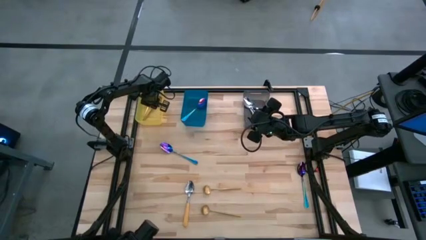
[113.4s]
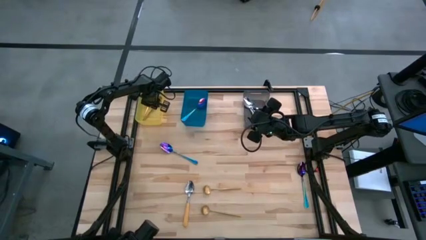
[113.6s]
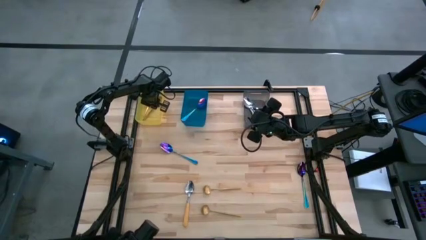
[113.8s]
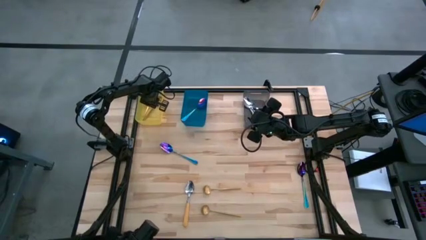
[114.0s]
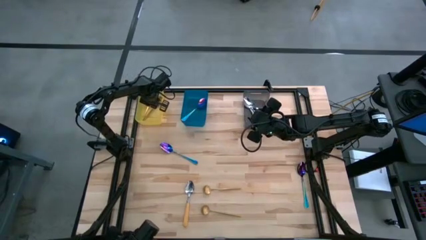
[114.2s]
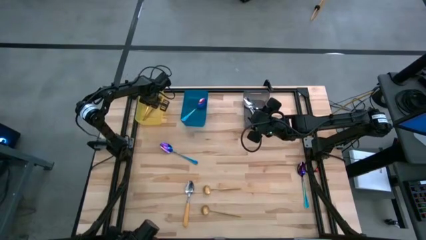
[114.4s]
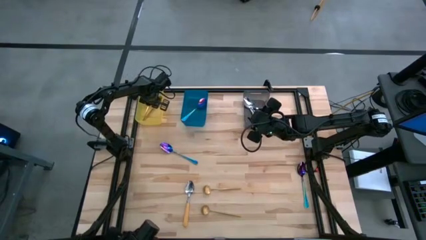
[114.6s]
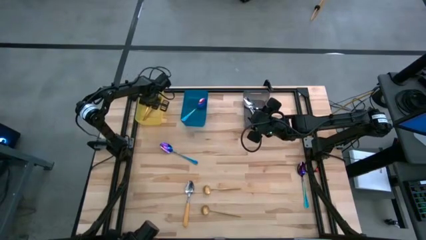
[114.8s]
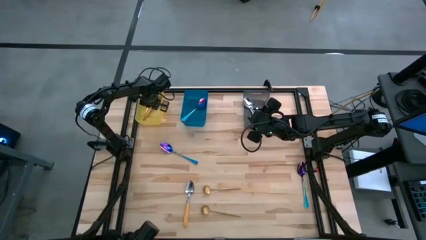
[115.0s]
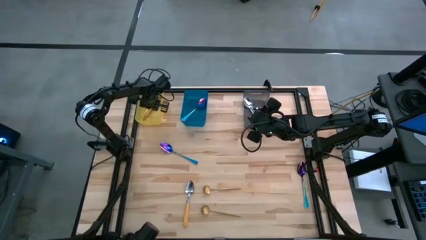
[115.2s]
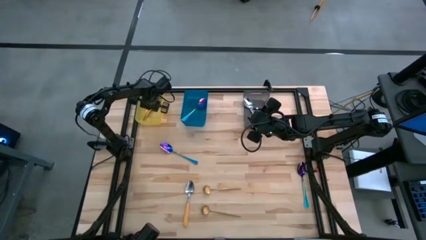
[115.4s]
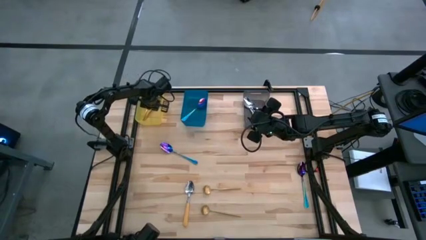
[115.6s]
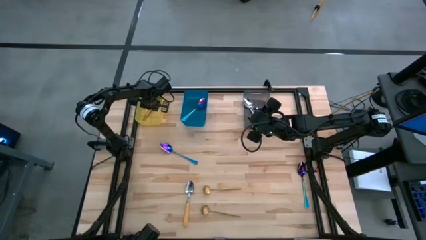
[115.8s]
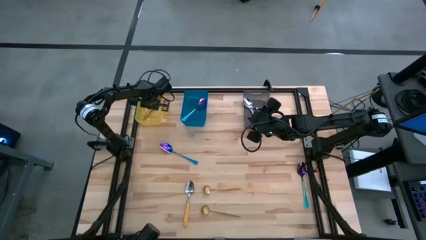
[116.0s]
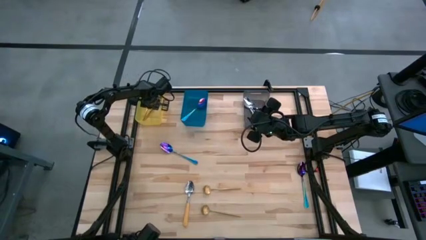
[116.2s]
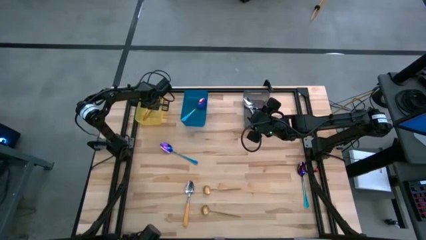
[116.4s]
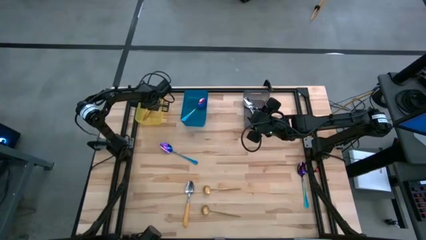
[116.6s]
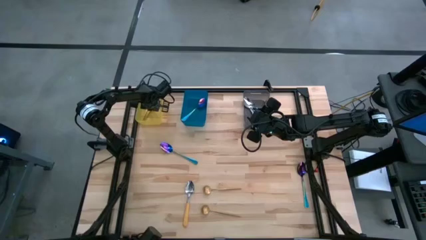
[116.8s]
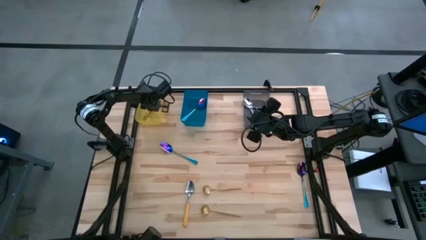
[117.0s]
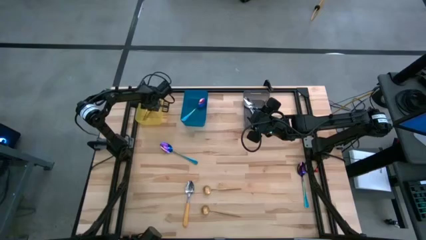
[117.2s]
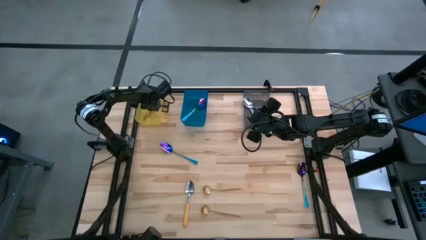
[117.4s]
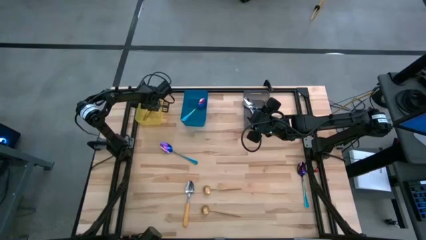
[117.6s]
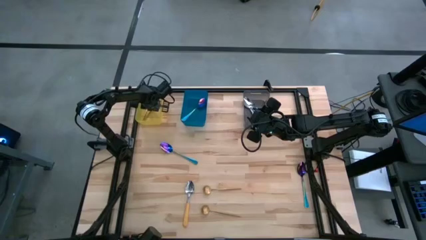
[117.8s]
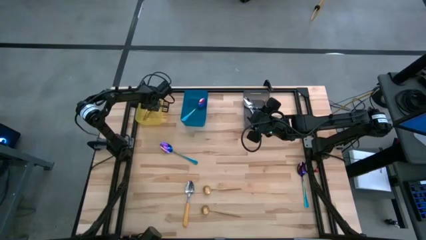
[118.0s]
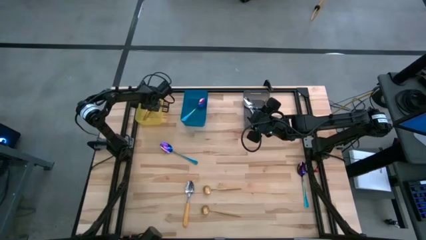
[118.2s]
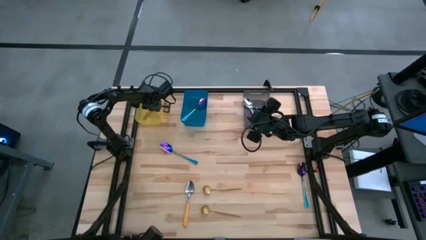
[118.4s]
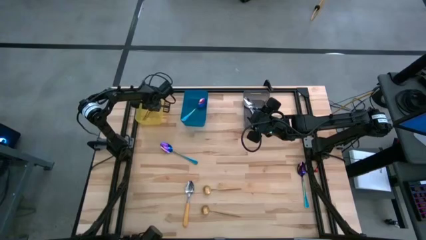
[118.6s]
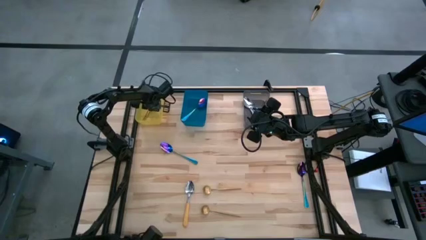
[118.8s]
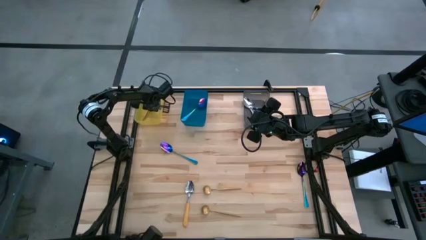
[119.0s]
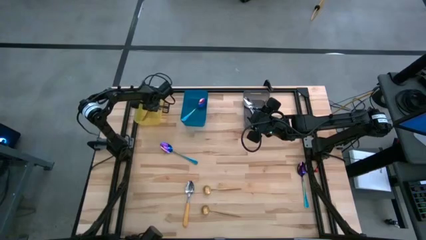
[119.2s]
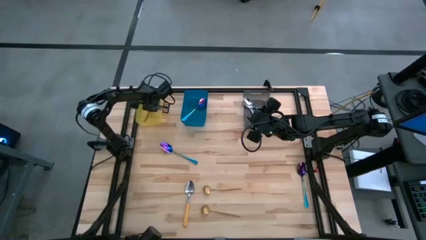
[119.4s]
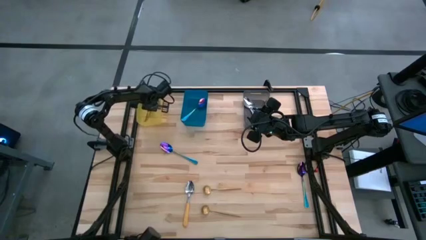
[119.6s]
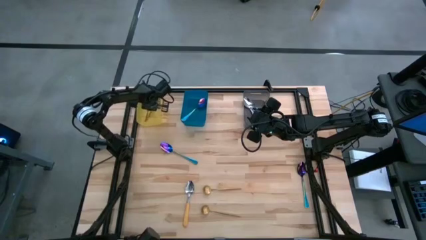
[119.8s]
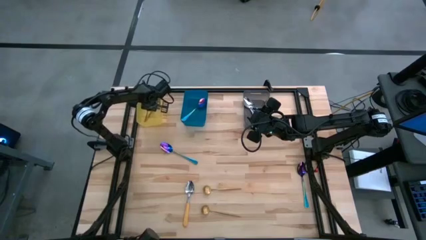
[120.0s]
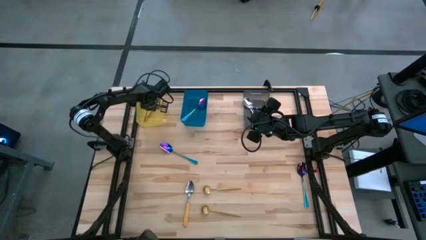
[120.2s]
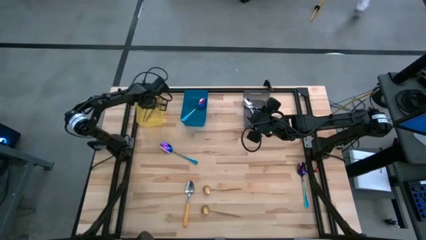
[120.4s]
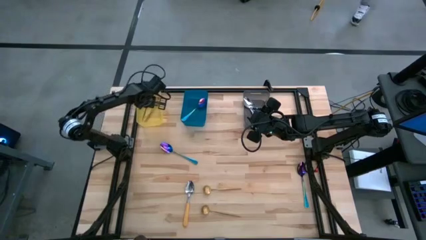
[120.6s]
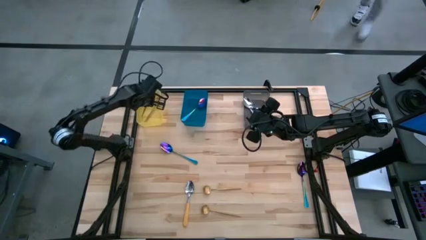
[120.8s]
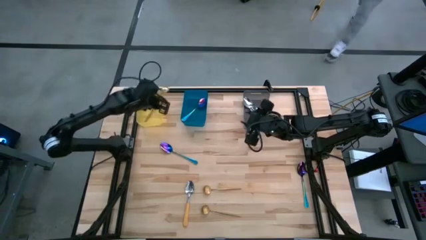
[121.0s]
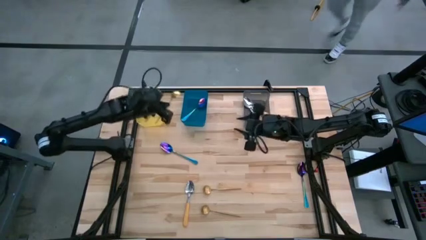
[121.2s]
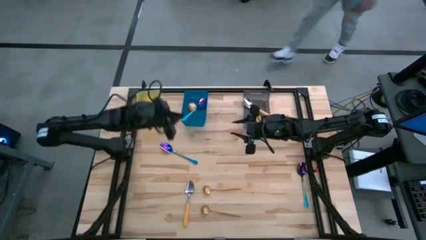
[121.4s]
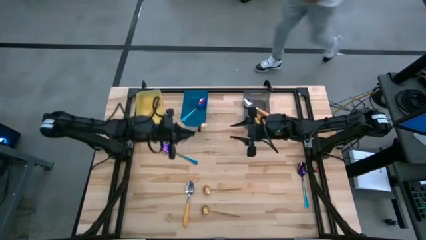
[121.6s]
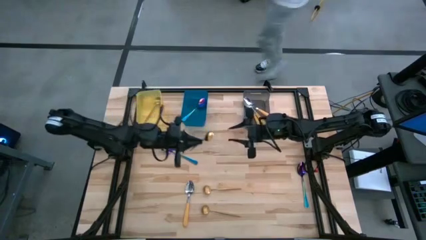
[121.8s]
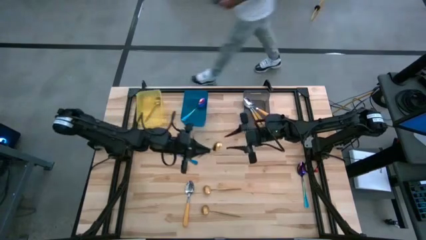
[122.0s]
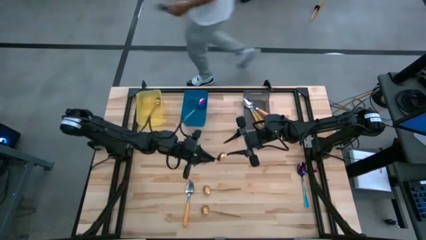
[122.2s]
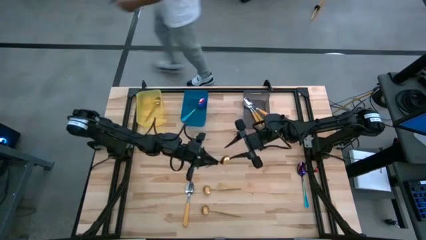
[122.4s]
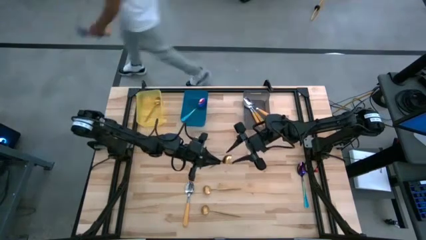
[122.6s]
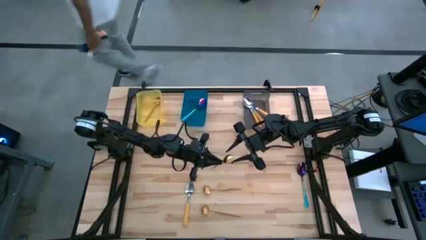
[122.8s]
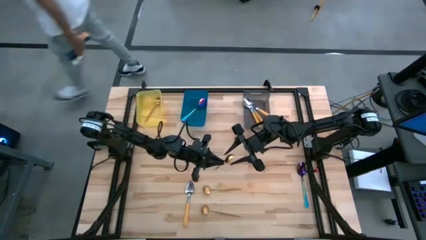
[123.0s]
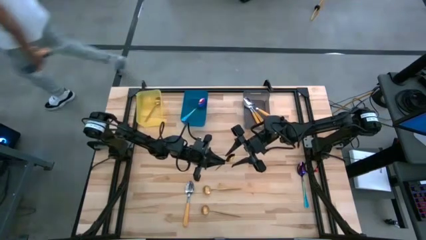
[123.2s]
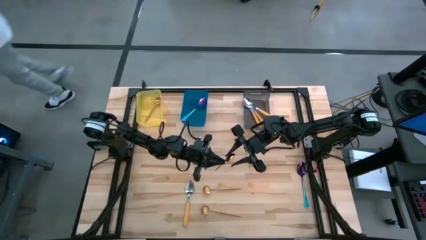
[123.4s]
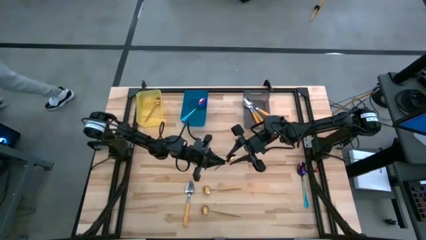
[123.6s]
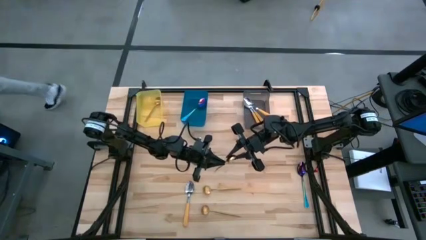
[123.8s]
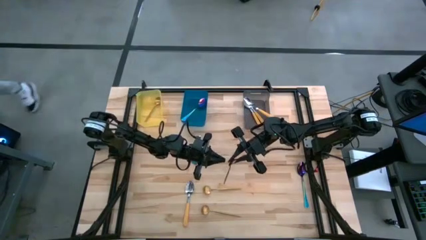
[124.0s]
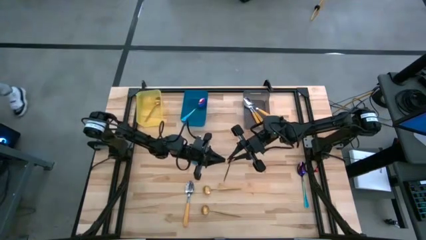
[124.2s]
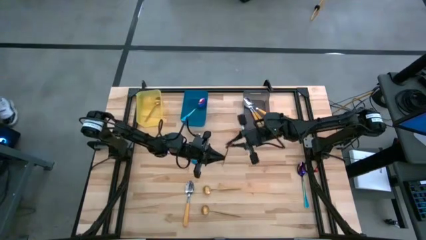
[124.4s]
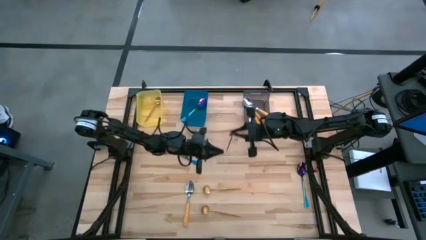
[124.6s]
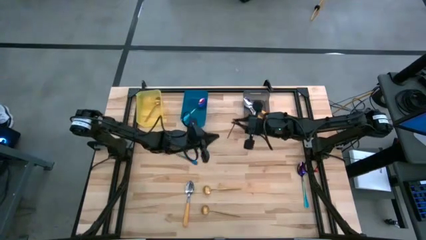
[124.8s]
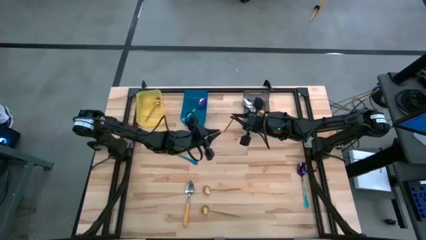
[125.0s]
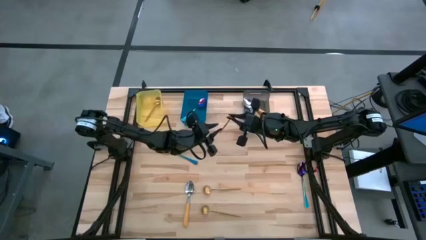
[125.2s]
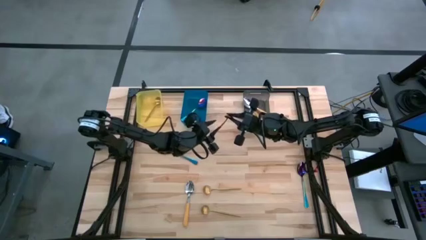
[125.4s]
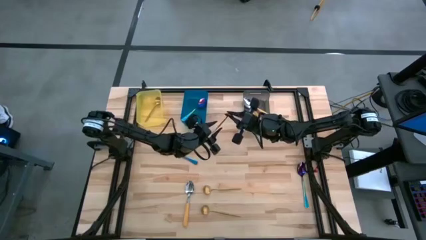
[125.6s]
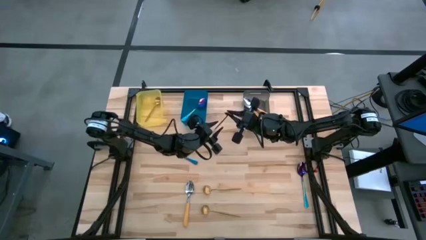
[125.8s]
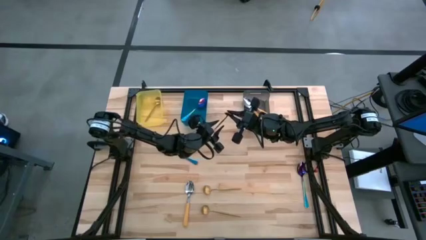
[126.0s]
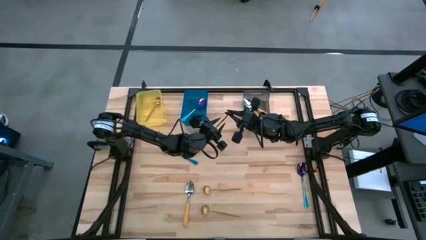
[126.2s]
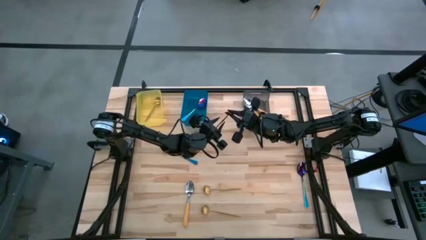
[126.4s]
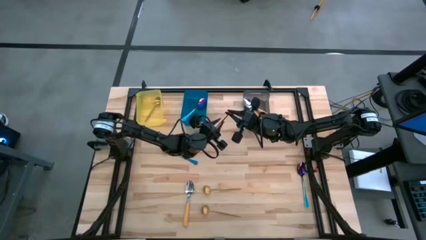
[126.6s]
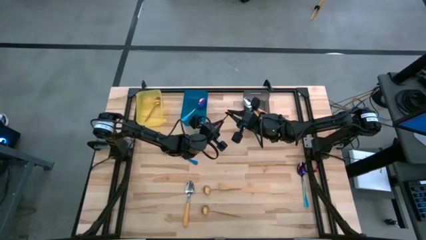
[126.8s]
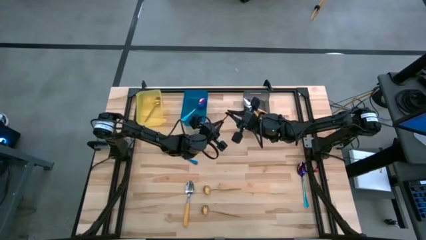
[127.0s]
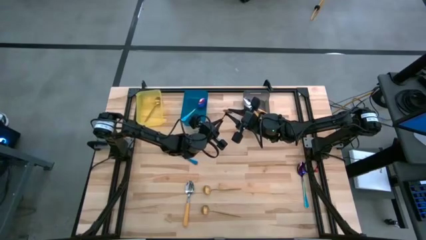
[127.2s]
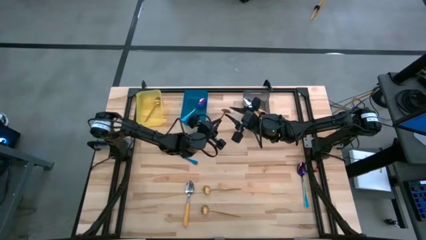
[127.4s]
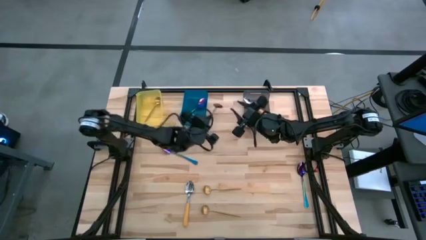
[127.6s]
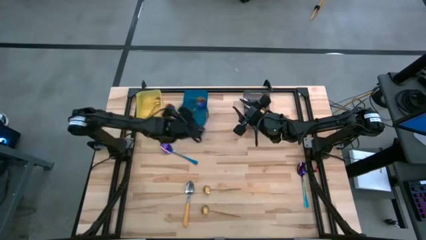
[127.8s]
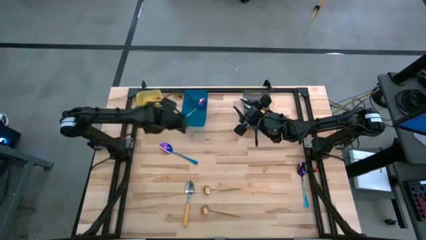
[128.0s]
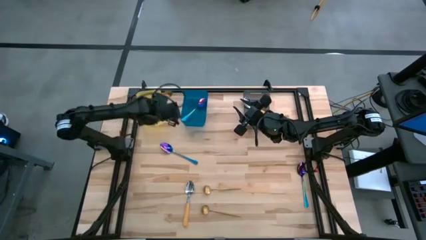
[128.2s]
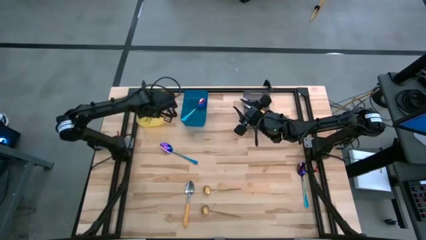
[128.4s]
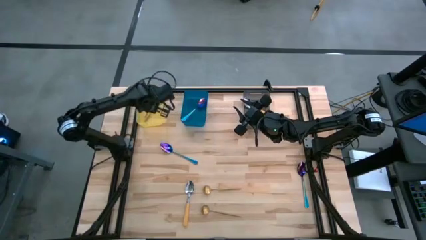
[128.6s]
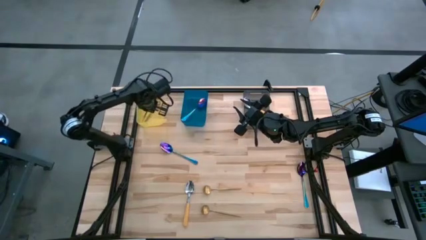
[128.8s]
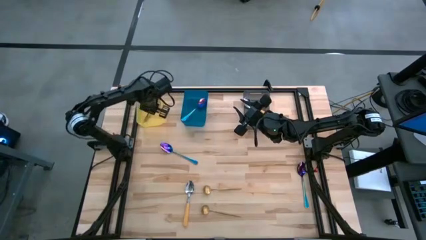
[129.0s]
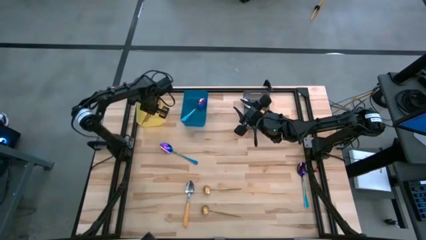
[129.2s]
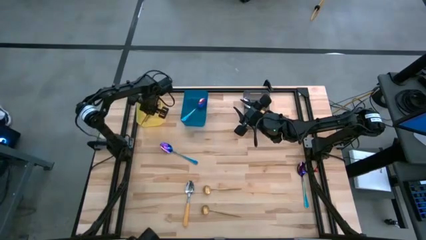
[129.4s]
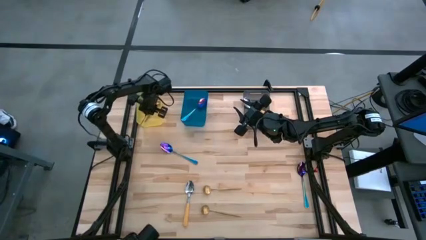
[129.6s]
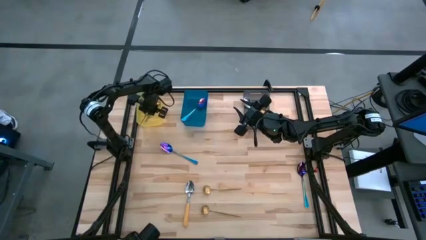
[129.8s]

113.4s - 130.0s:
Task: Sort silverware by color (type)
Put the gold spoon into the yellow bin
